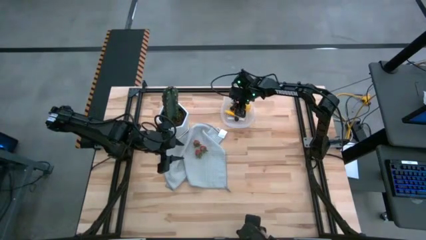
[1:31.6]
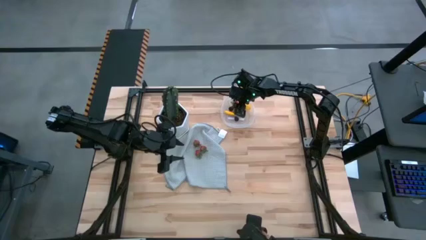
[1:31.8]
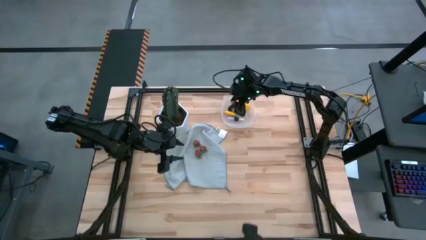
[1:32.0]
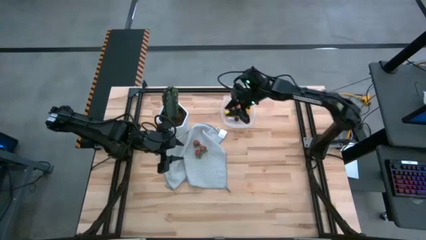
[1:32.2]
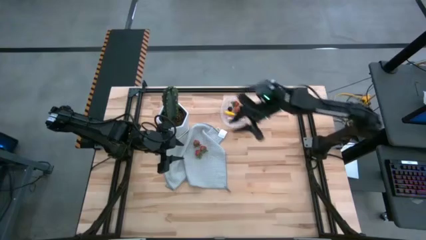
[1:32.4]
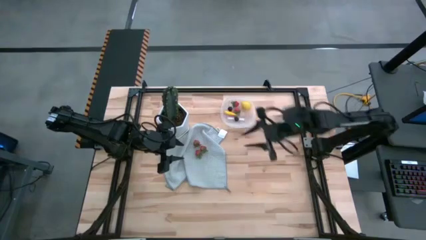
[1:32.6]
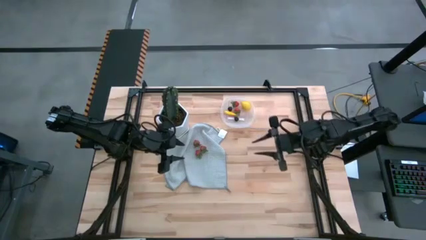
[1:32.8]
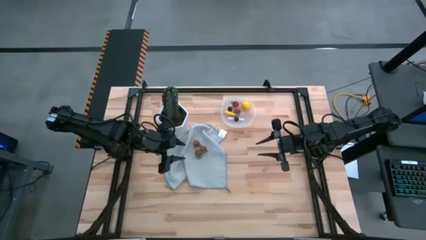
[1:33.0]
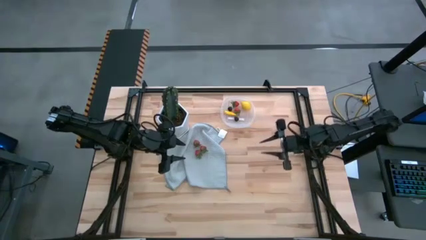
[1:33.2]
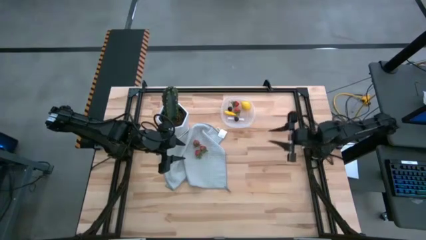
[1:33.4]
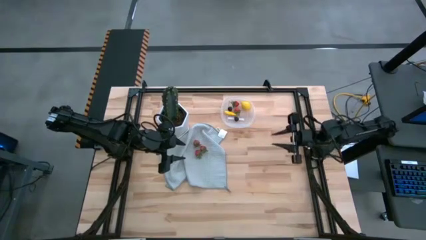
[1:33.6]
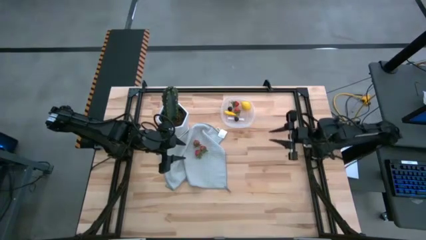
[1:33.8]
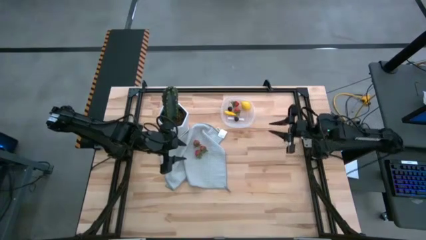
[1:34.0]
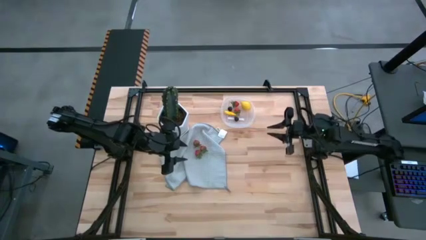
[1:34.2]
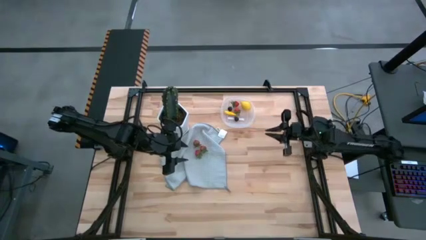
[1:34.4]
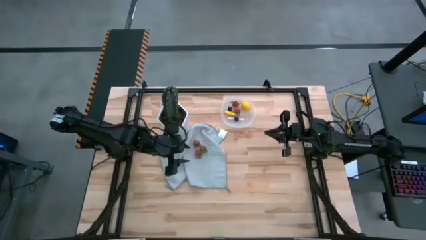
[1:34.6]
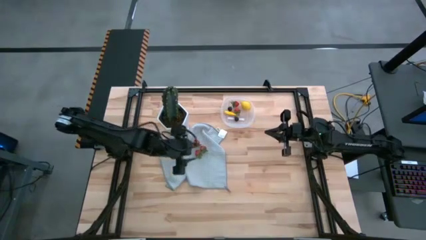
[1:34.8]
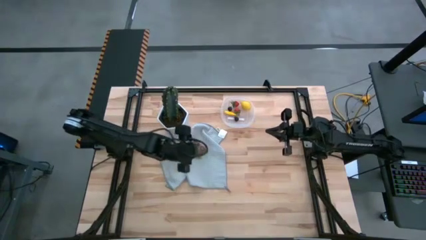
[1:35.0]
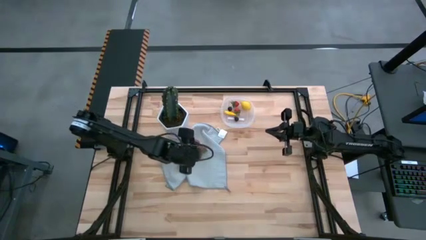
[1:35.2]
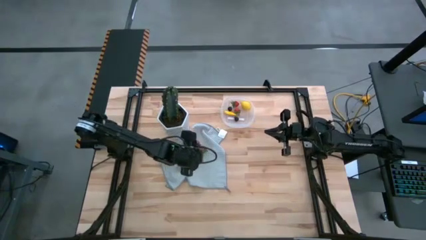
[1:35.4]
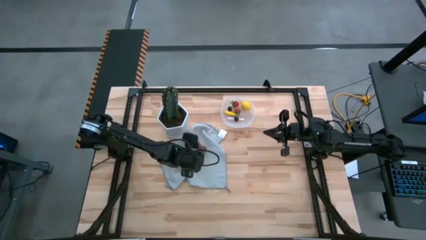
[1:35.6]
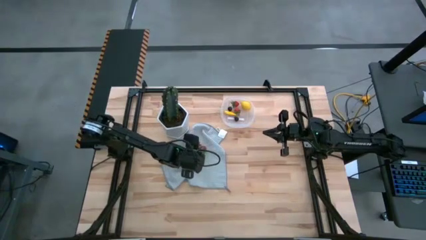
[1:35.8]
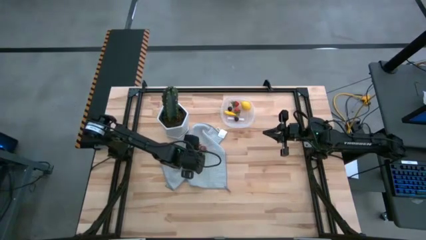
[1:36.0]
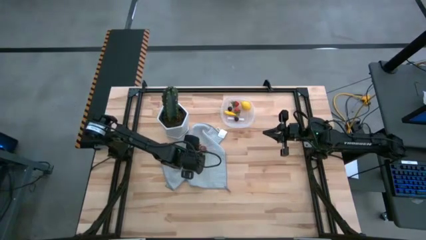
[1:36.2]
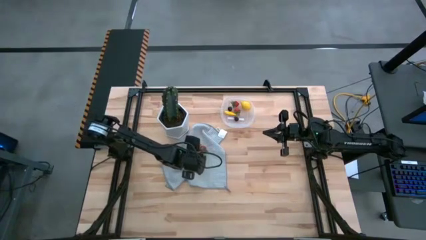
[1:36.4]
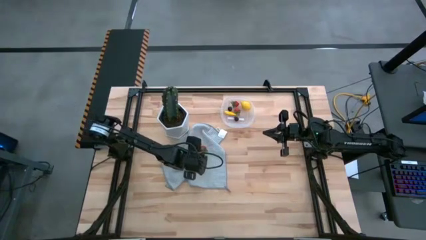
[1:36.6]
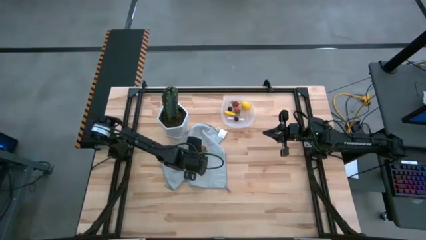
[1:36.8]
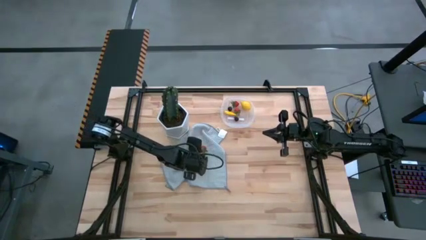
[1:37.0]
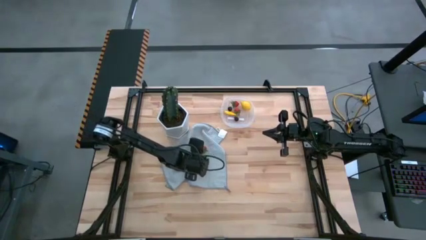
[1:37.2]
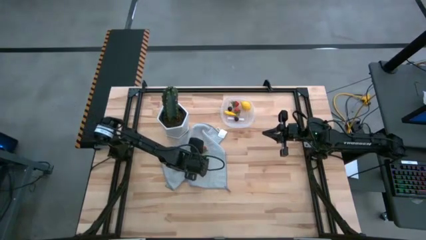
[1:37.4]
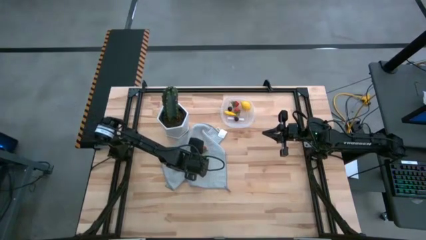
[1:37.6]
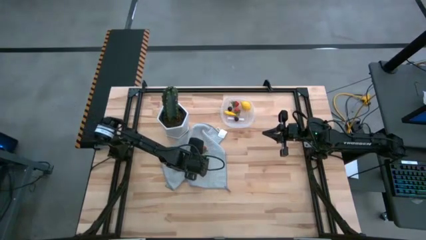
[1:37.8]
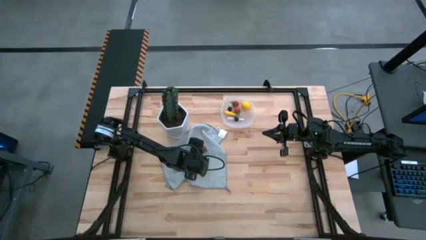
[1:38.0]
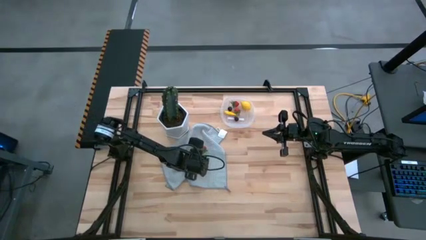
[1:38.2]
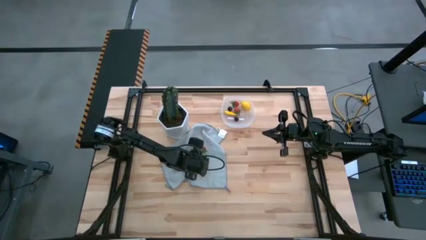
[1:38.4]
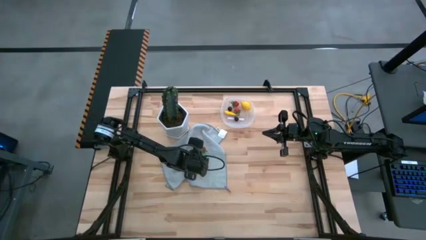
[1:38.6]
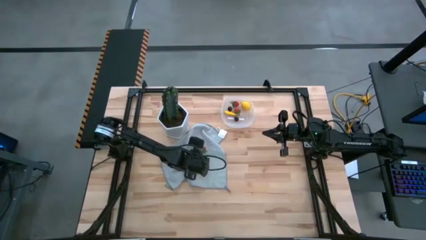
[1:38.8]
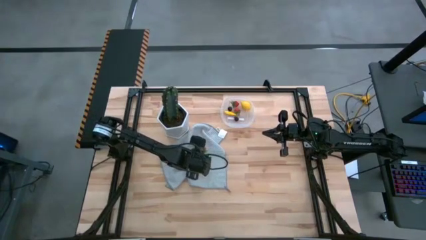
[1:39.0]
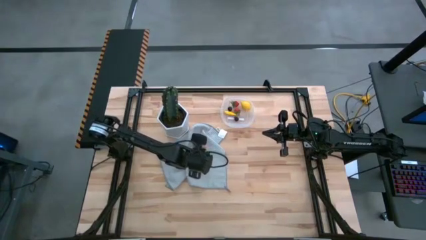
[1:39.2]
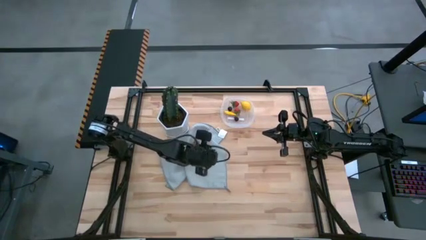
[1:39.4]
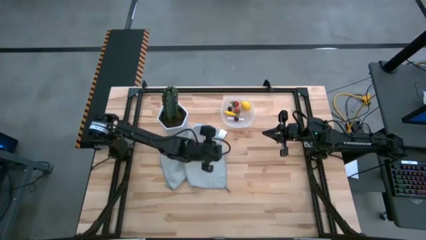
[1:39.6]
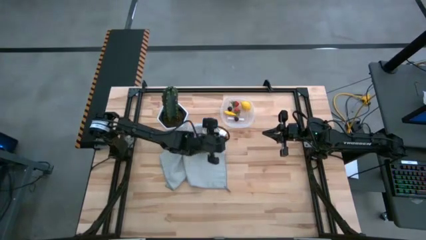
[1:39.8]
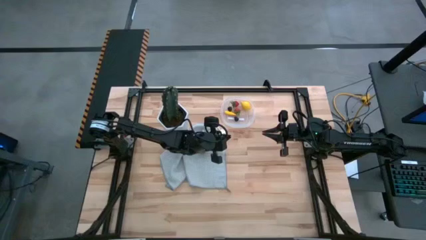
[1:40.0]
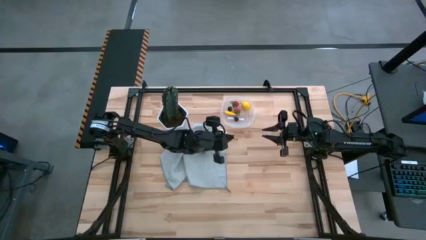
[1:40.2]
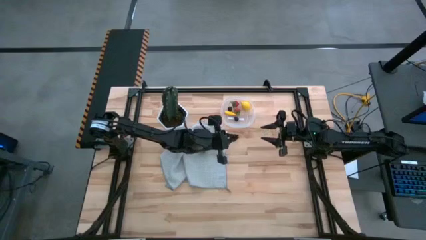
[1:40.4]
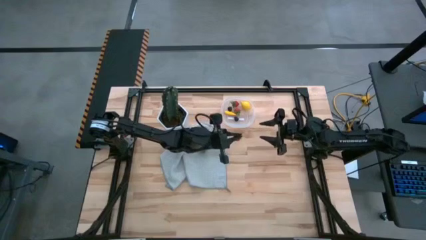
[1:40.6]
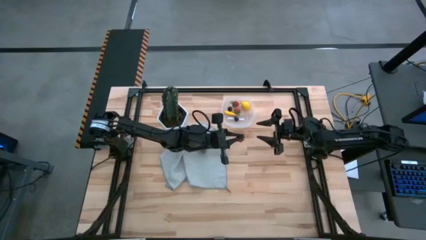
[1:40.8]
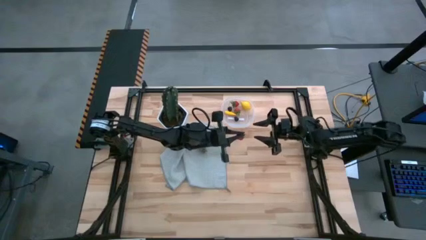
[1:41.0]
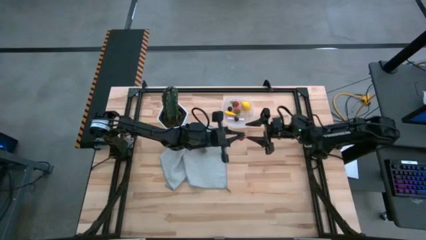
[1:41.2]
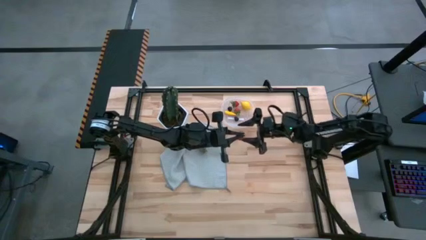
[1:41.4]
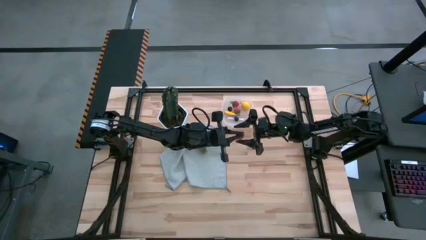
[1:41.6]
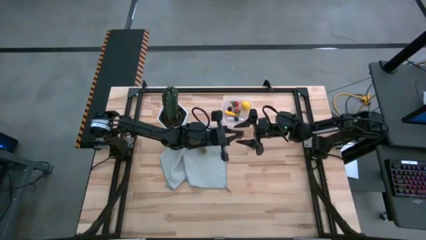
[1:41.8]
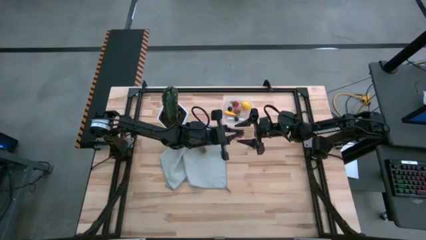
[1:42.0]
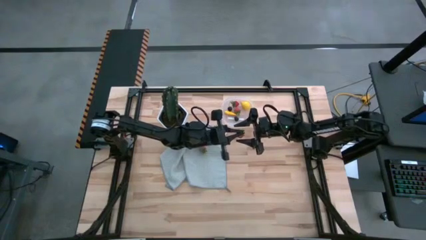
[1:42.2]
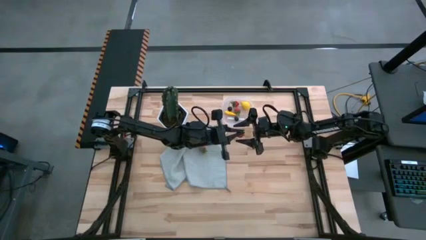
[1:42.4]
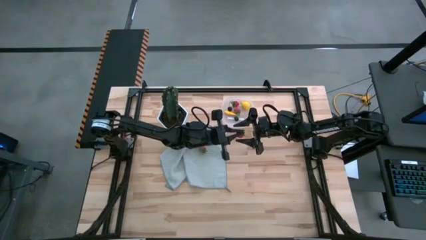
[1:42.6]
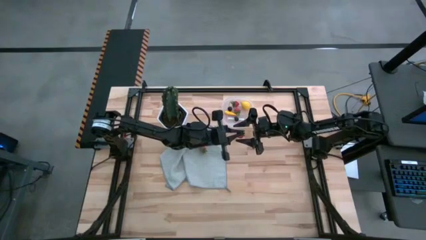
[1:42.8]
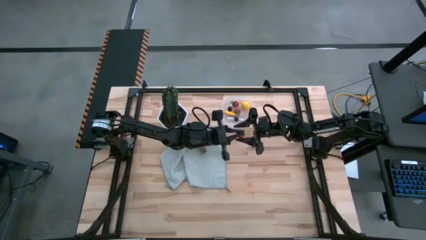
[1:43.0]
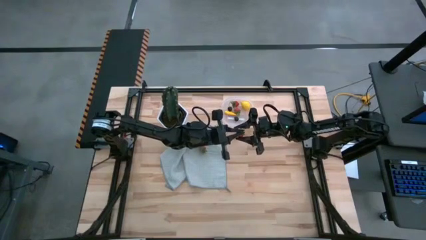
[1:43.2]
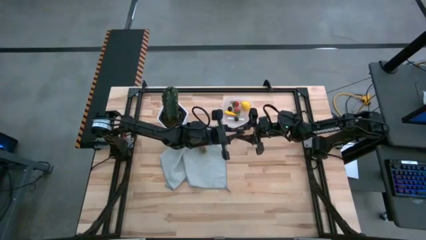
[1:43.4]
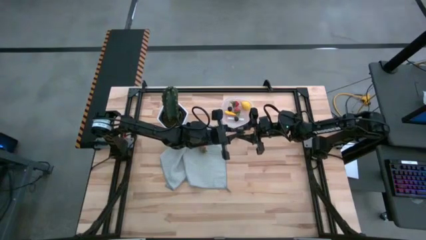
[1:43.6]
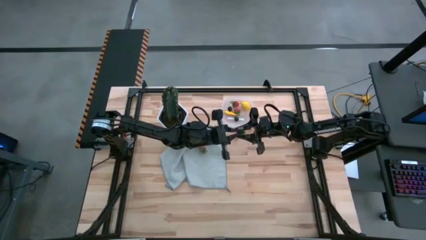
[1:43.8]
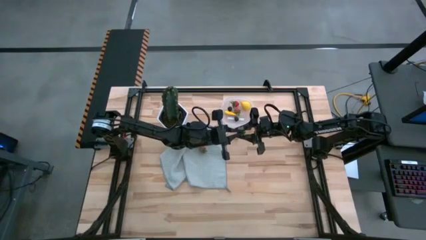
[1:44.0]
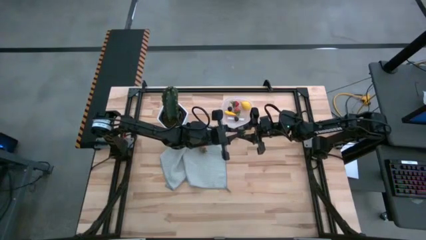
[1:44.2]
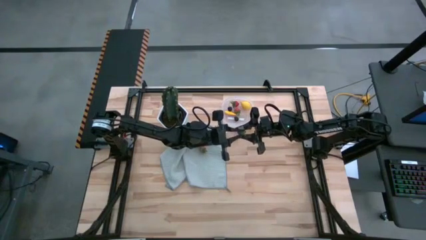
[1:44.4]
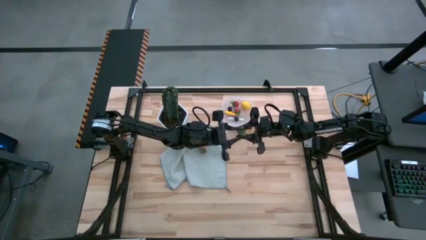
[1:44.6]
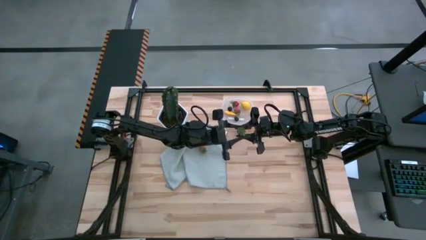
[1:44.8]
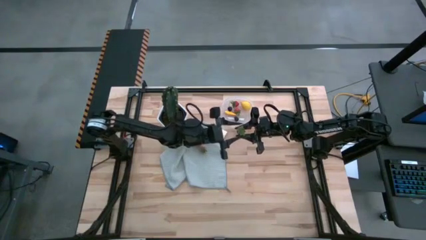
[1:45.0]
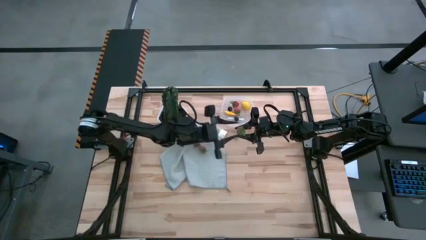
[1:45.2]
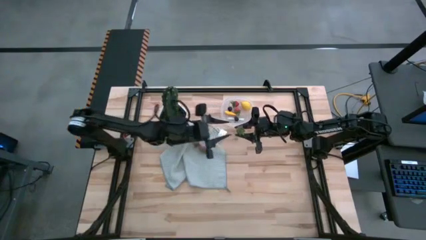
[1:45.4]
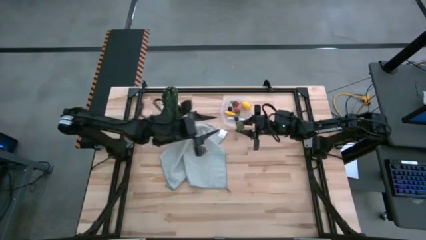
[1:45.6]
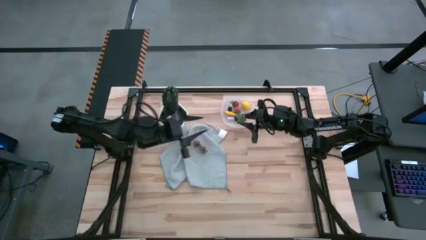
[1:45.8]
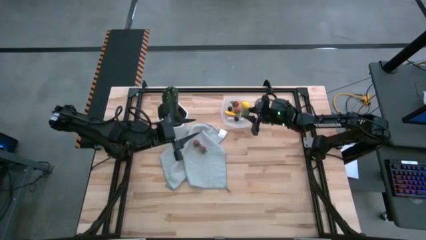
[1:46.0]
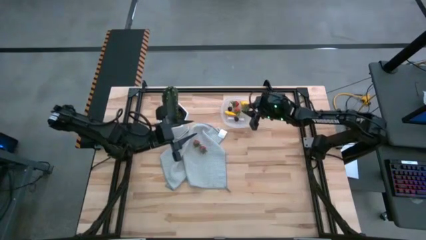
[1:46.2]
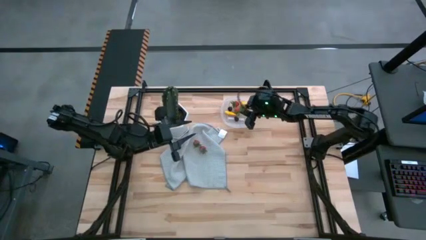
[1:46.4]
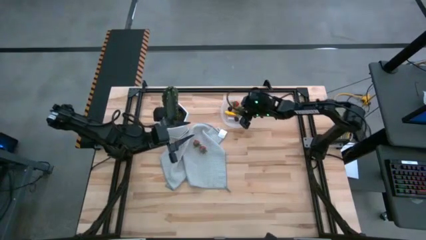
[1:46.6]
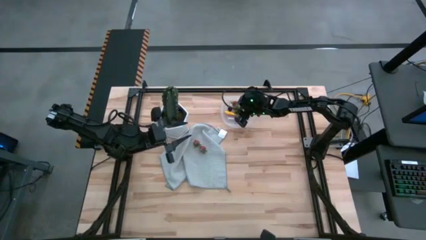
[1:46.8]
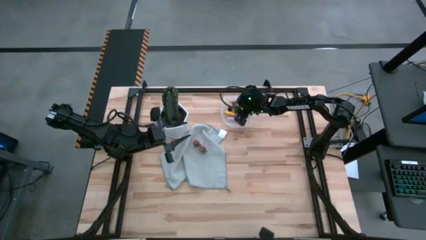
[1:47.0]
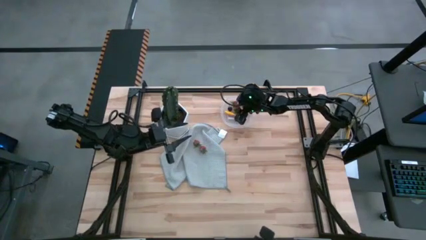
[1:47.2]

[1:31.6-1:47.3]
Task: Pick and placing Produce into tupperware
Put the red strawberry into the transparent bin

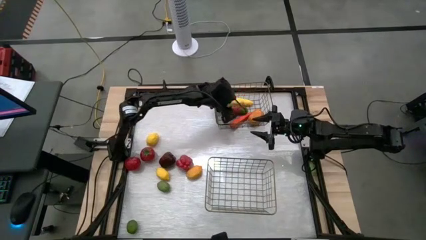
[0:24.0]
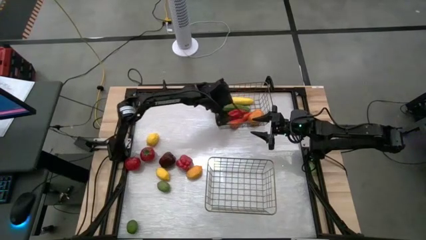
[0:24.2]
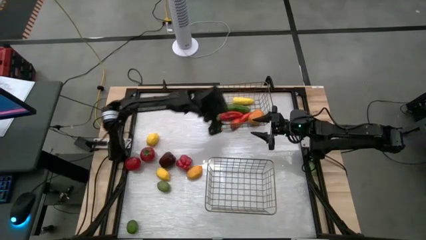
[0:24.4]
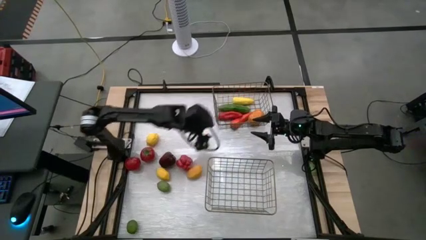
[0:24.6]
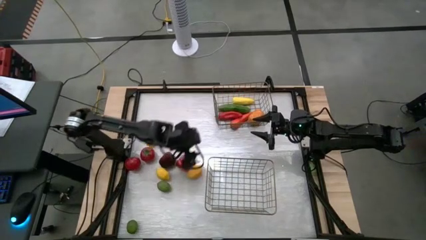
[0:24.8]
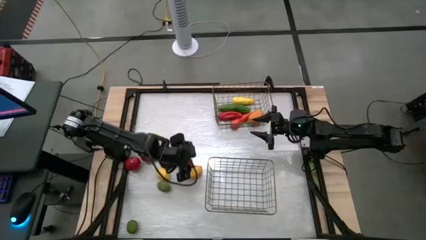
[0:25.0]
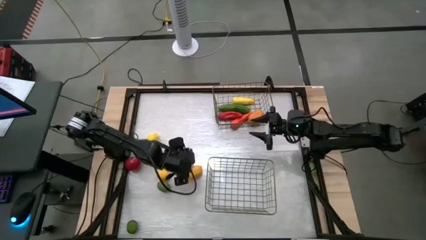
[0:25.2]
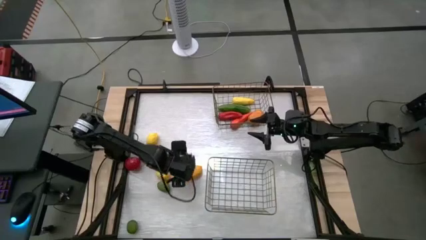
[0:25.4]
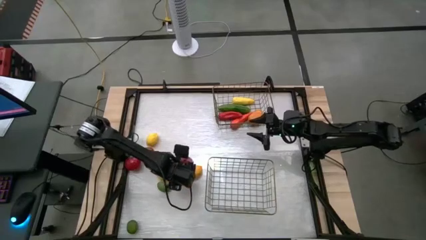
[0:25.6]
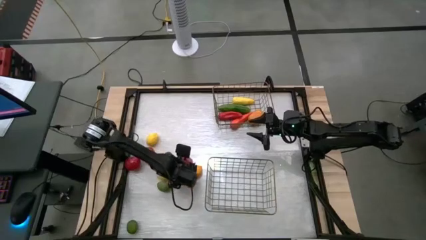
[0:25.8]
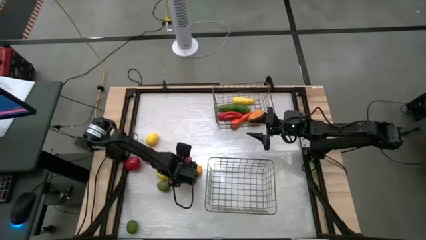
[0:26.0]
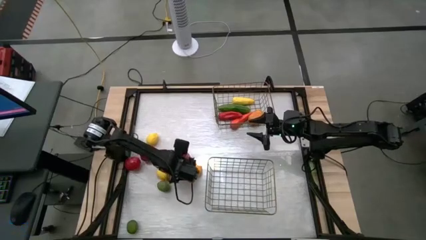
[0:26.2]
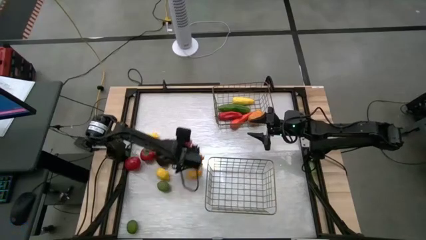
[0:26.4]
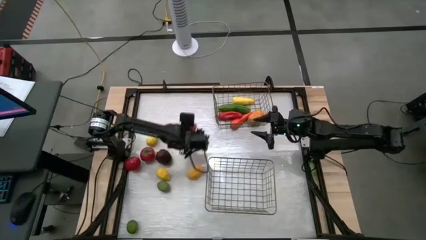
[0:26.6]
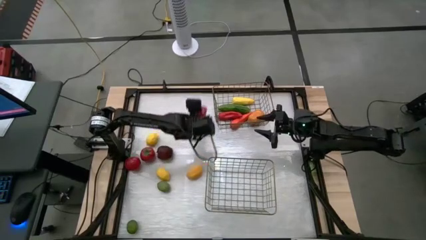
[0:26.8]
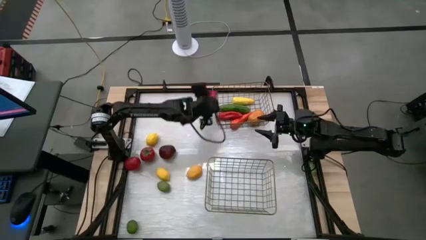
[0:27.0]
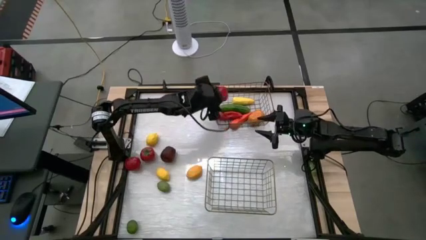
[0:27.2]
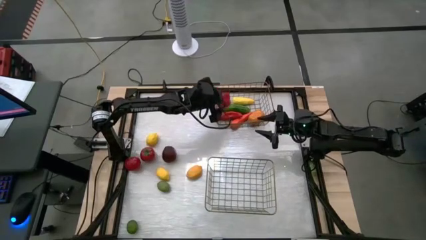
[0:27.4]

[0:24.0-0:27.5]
Task: Sort produce into baskets
Put the red bell pepper into the top wire basket
